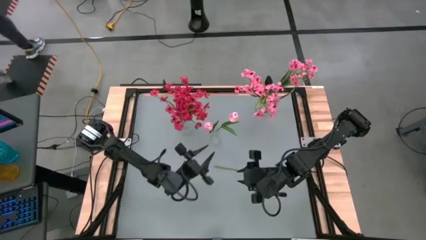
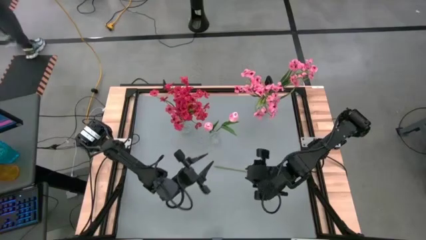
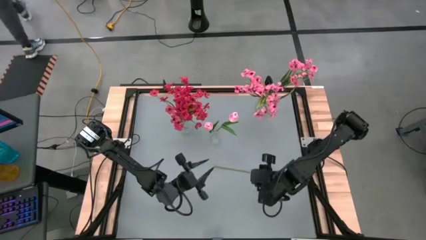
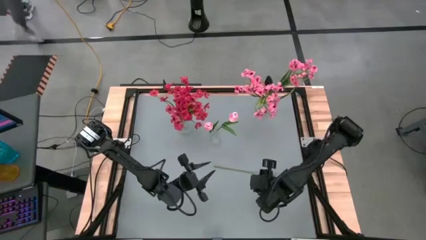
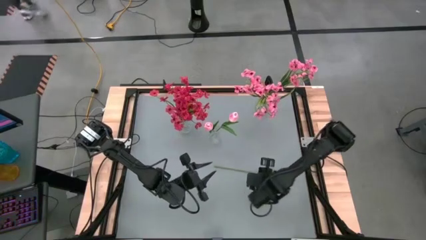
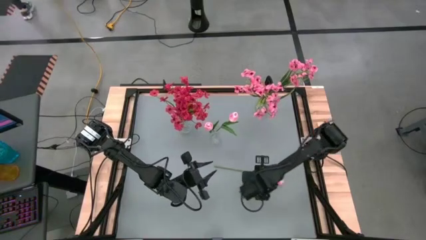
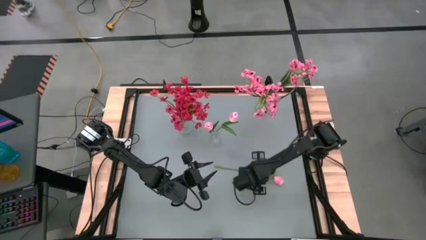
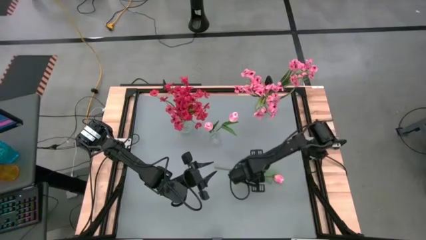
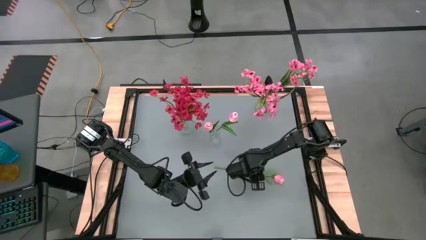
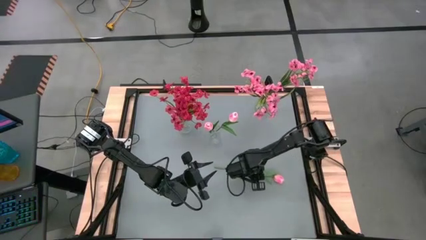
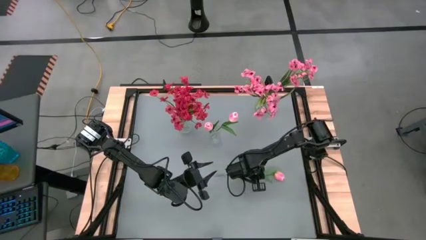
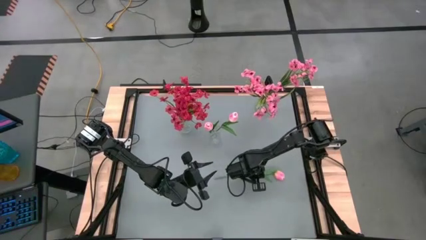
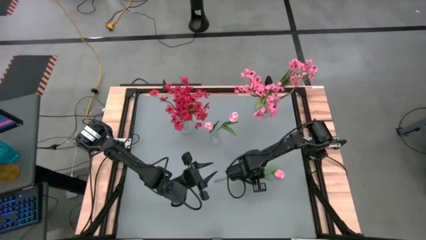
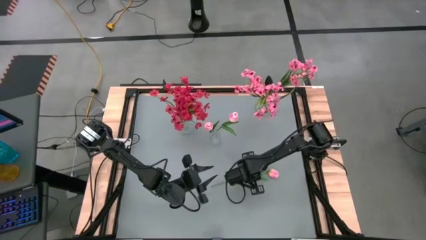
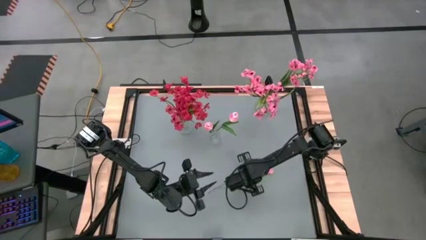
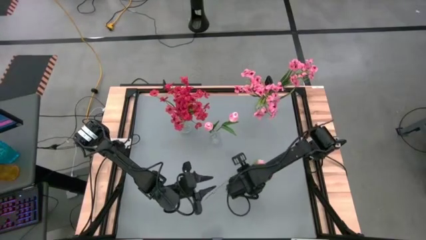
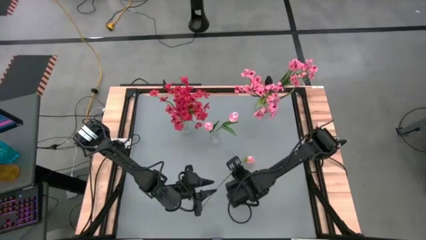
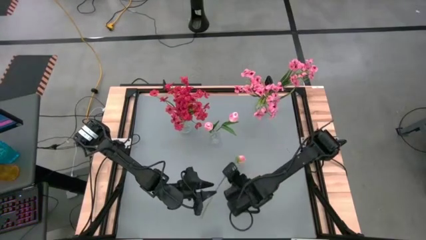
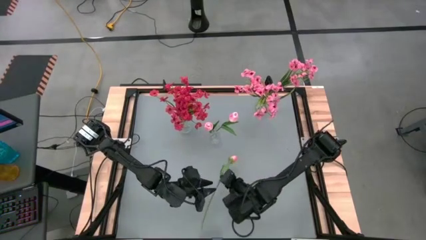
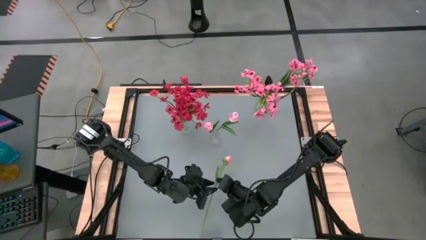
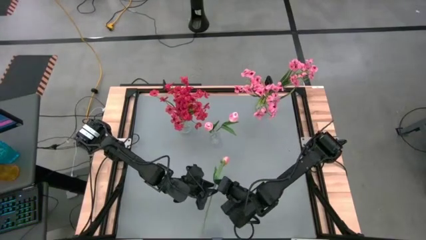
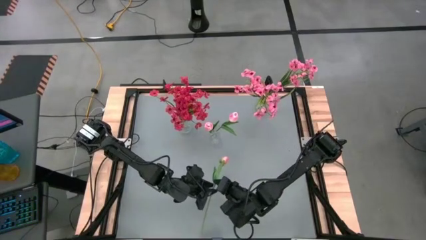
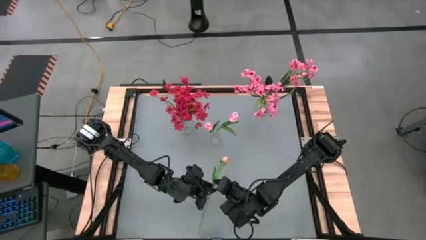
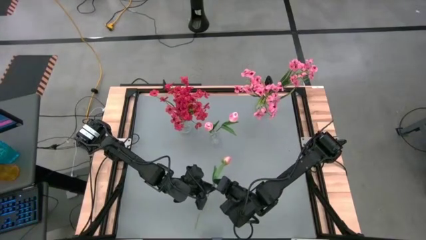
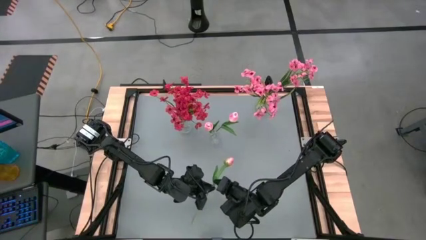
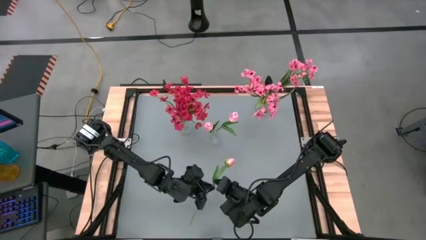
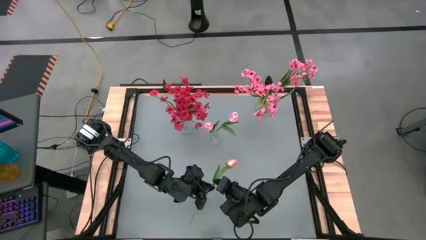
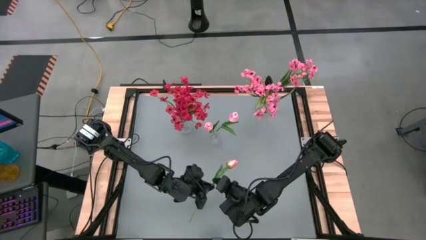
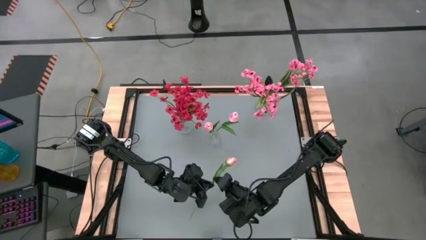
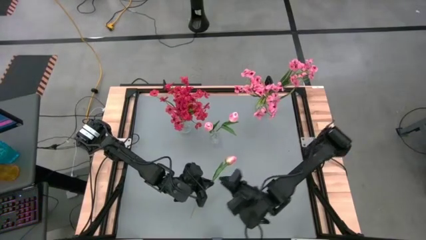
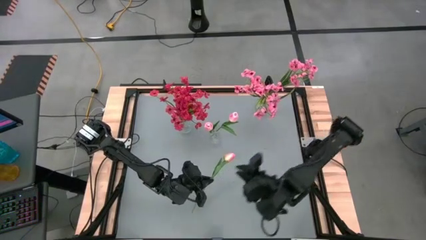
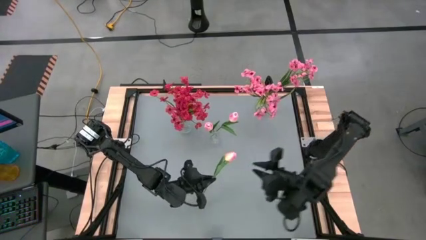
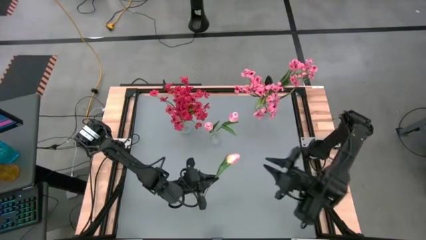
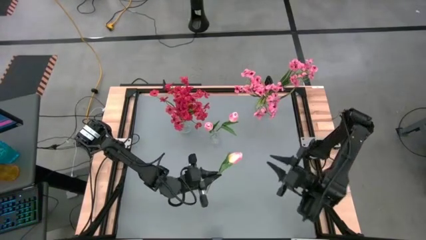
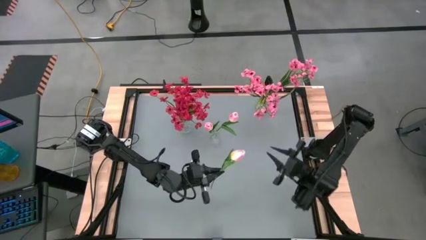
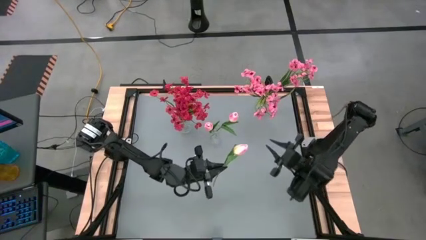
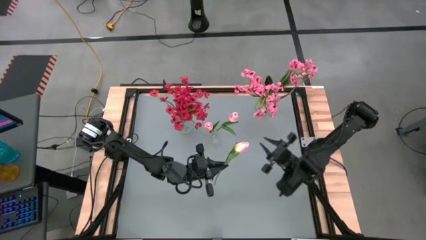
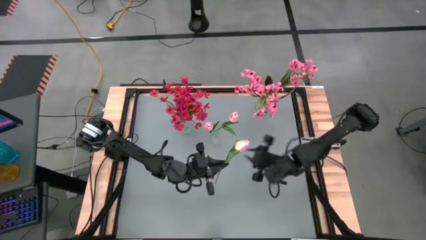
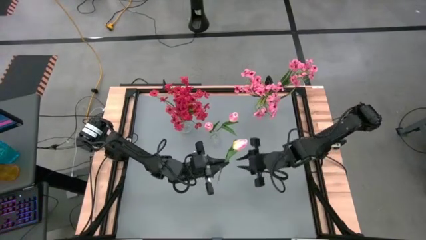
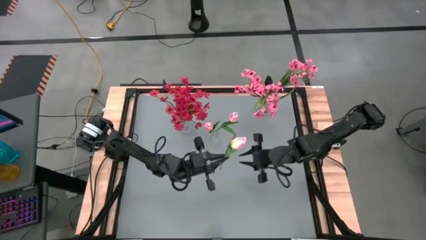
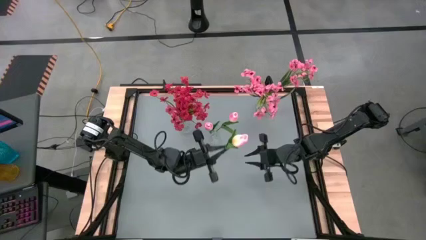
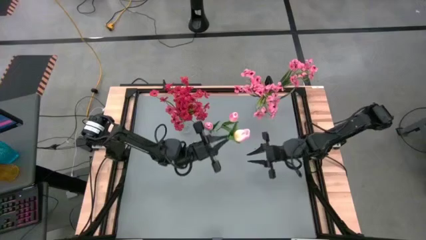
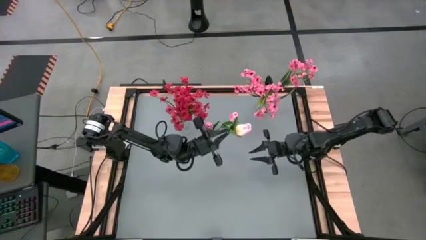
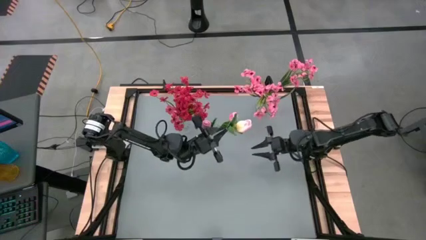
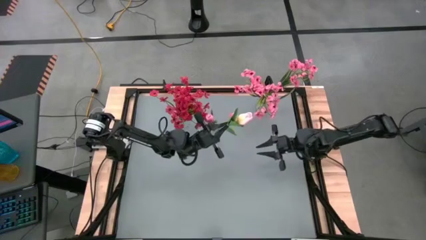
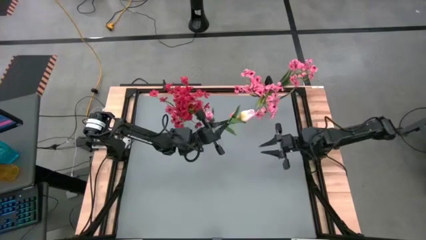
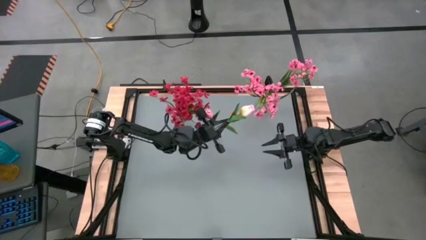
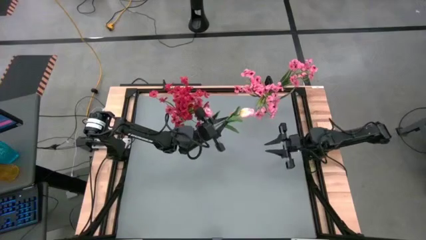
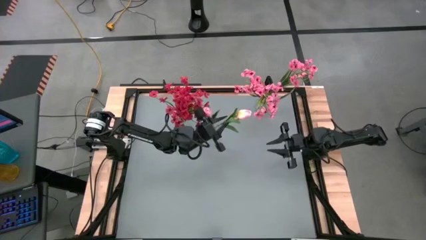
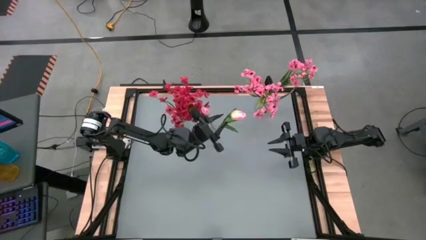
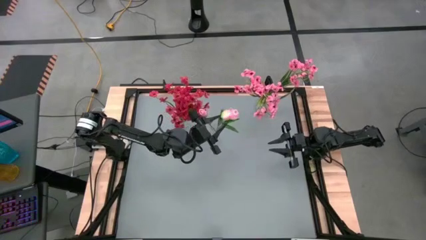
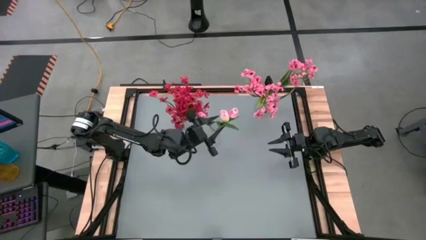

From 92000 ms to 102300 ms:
Task: Sort flowers into vase by color
Put the pink flower into the bottom transparent vase
